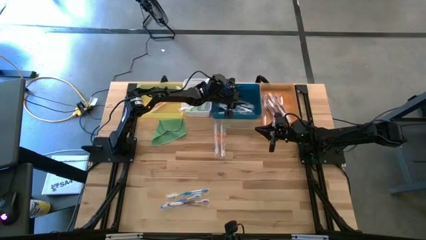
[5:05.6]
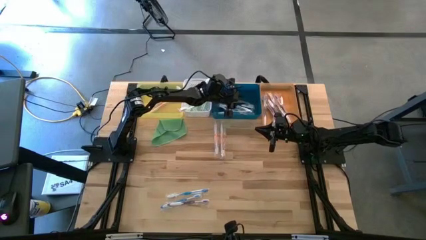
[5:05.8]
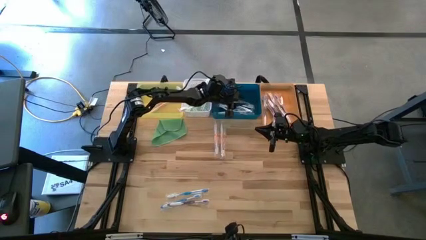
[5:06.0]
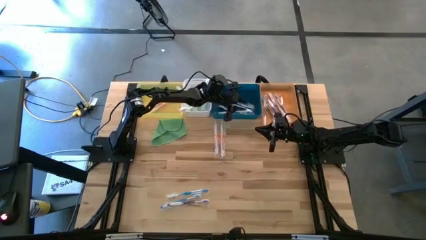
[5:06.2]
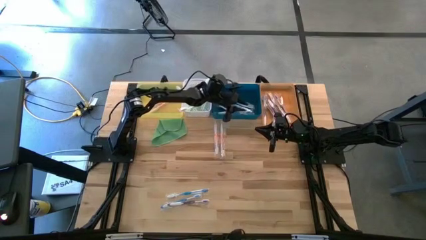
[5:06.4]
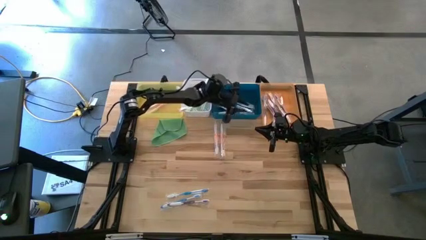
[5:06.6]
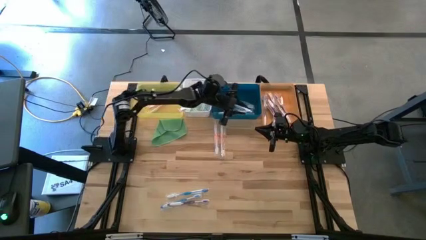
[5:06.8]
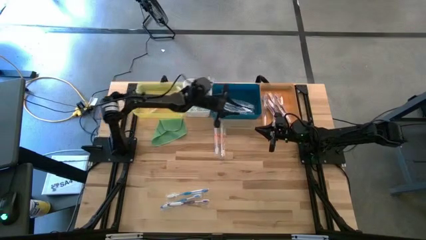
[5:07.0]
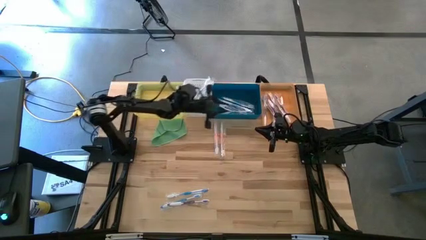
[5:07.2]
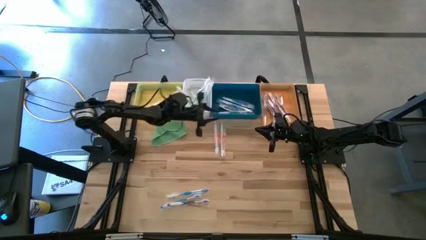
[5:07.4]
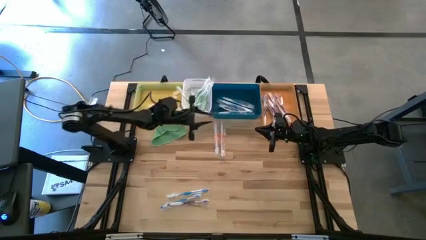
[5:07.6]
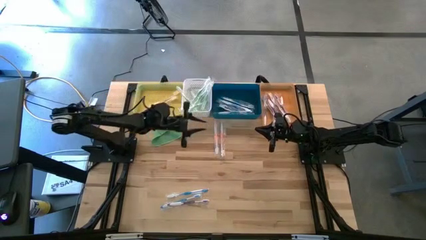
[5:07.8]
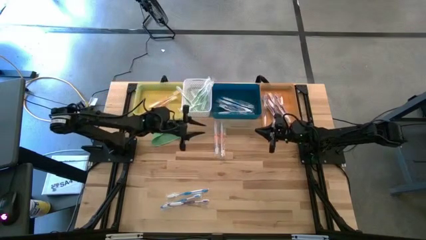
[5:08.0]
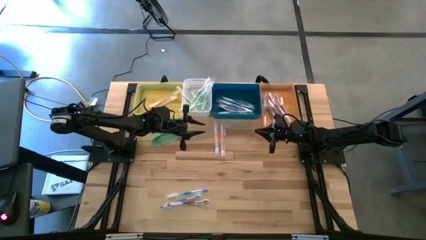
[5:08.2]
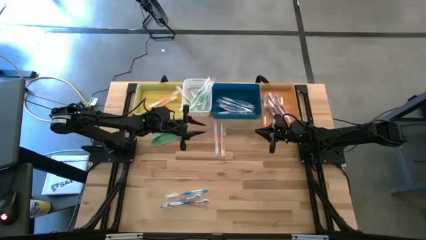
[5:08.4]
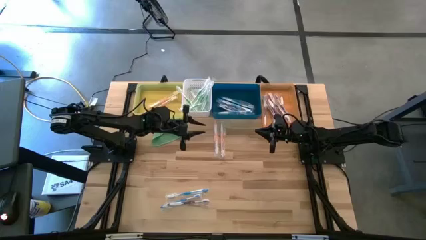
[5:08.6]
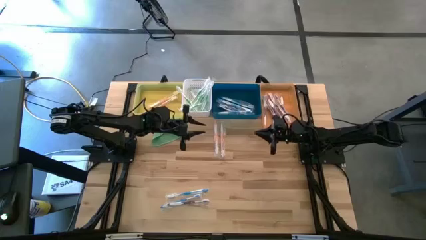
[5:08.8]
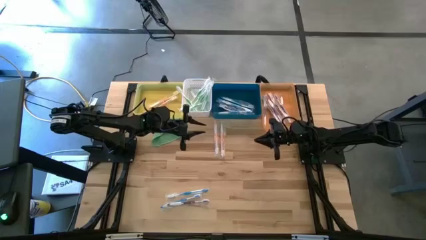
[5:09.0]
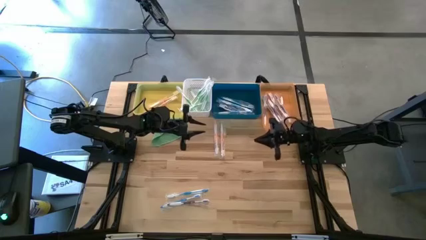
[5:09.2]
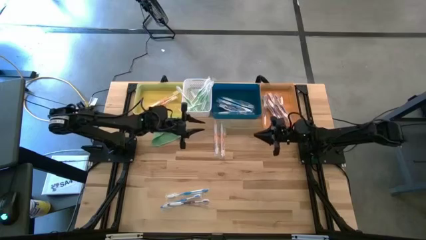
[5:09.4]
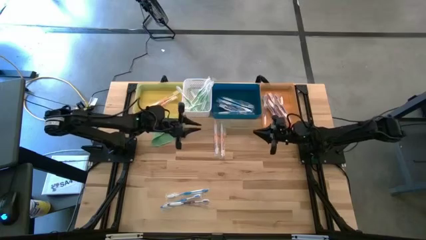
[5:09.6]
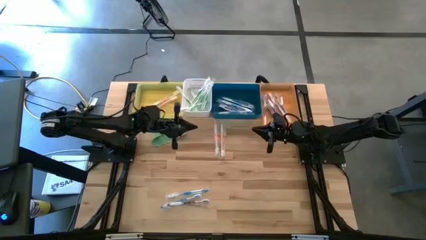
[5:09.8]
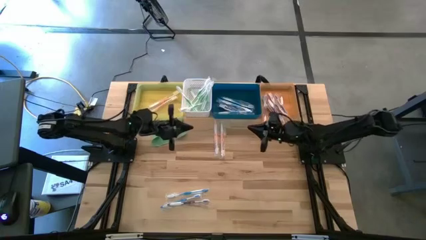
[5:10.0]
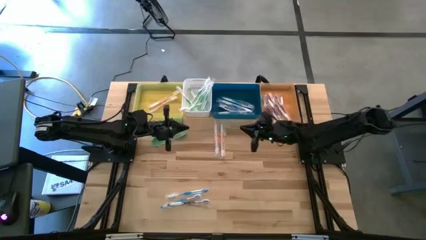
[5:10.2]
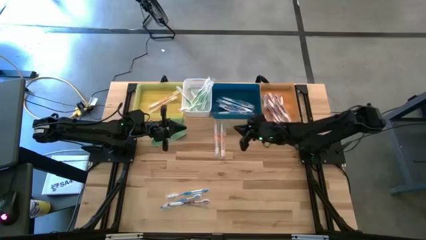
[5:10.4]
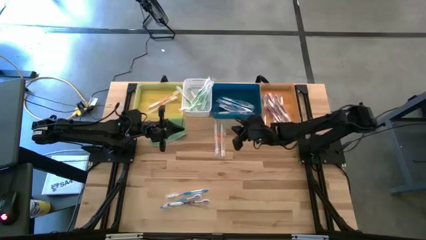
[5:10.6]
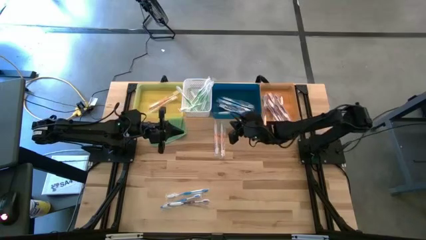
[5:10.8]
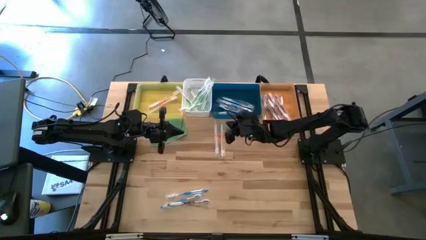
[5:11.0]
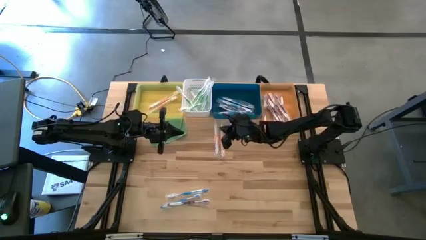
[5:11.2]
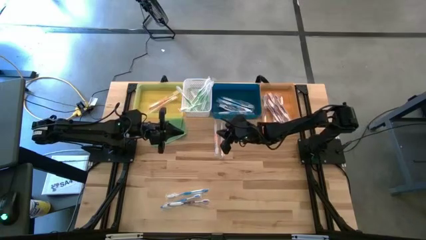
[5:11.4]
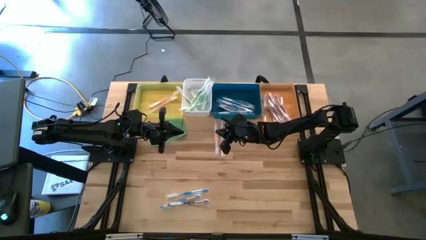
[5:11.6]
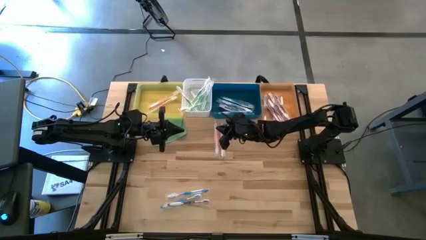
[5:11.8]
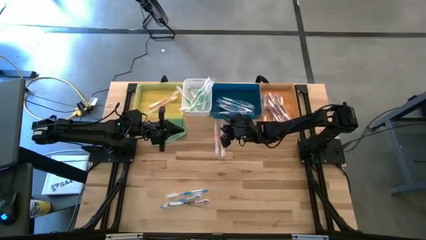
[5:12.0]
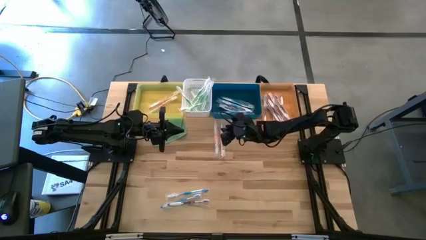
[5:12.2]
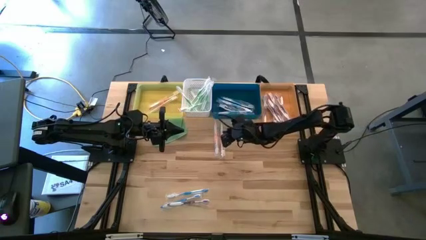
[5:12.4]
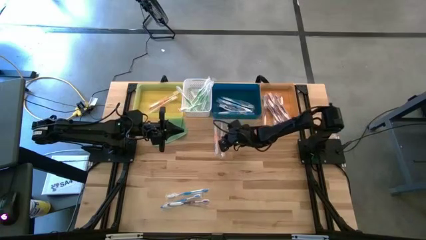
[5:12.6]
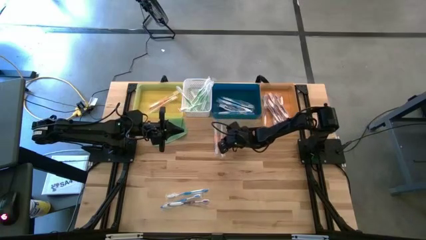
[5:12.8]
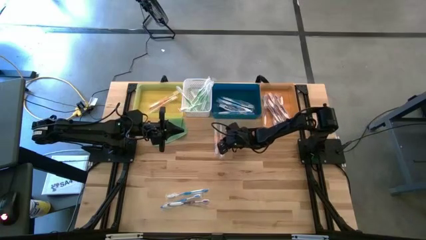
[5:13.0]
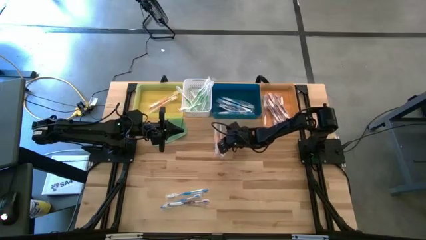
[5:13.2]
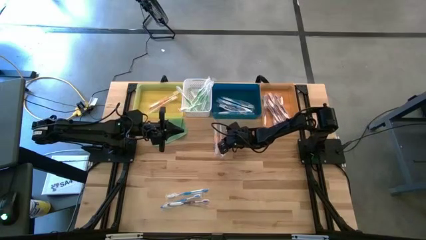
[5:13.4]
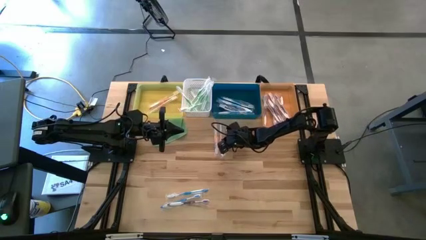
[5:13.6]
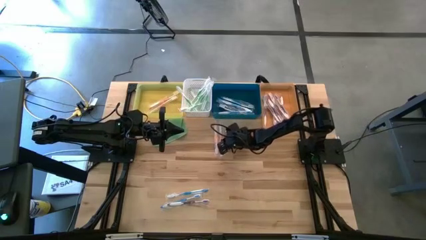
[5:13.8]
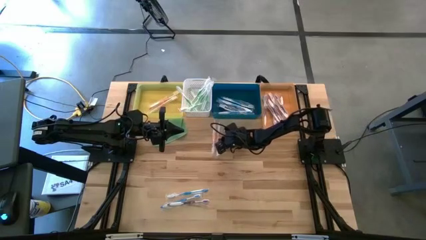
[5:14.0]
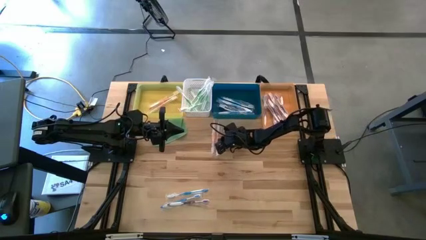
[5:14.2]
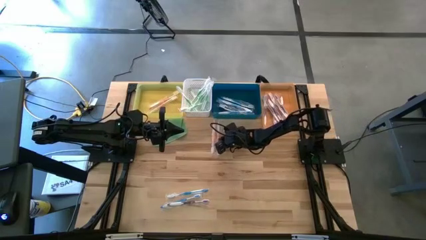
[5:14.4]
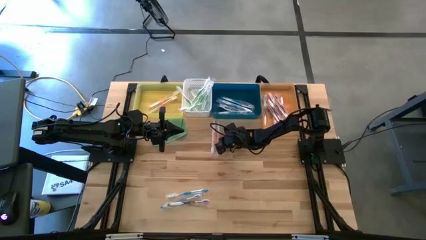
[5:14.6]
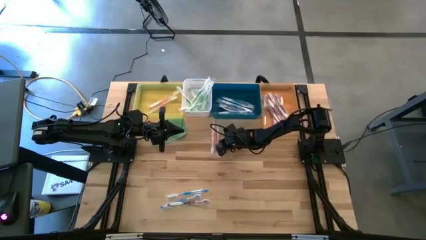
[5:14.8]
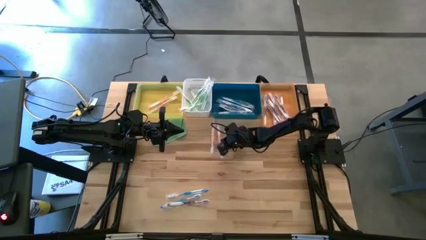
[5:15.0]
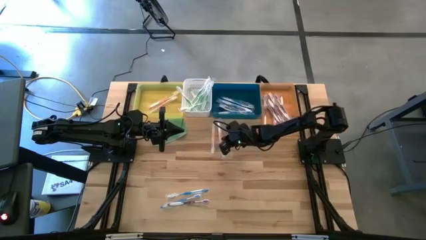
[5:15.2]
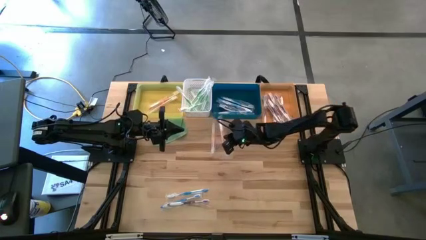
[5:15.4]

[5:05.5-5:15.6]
Task: Pick & Place Toothbrushes
Put the orange toothbrush into the yellow bin

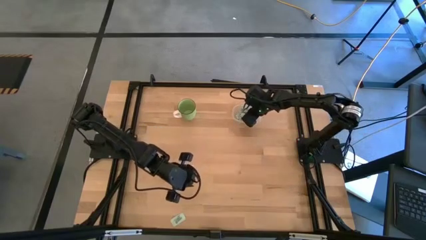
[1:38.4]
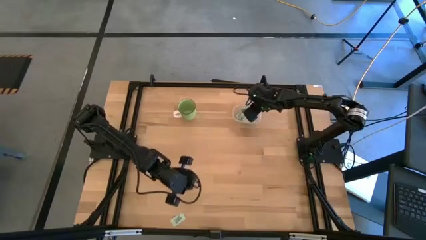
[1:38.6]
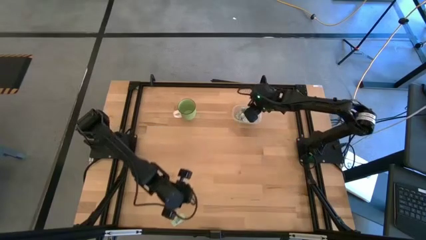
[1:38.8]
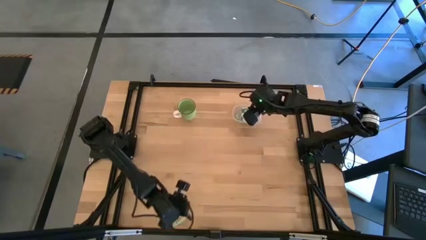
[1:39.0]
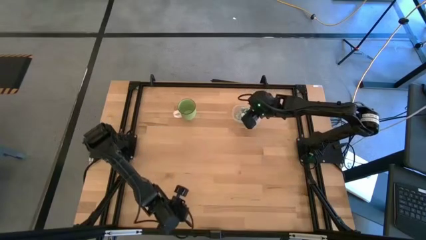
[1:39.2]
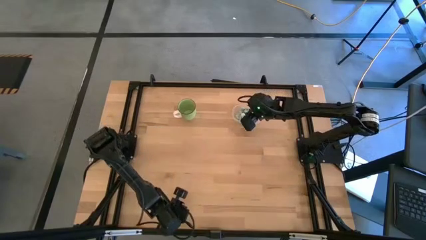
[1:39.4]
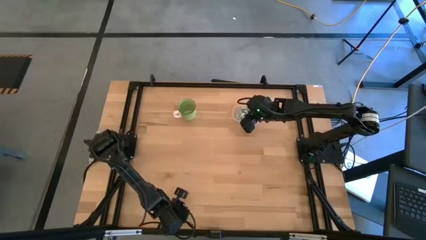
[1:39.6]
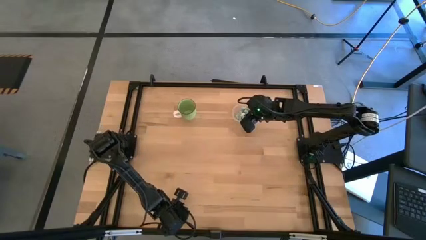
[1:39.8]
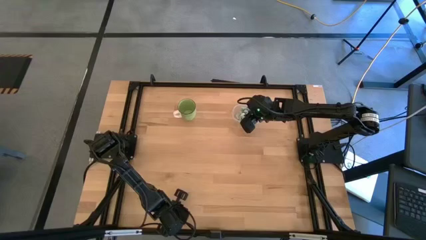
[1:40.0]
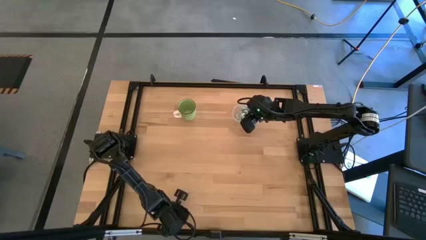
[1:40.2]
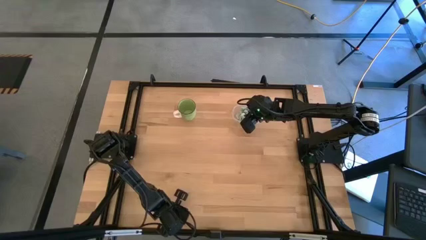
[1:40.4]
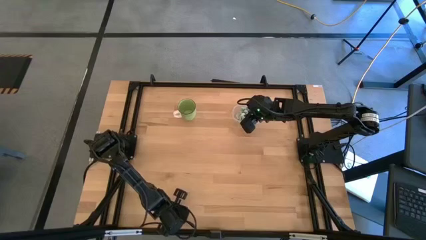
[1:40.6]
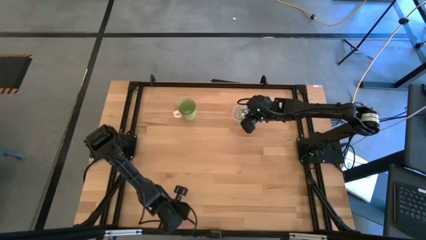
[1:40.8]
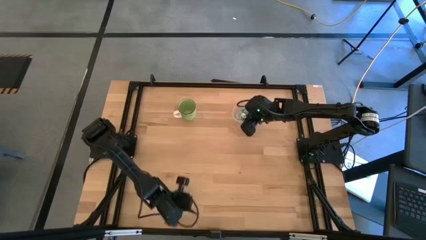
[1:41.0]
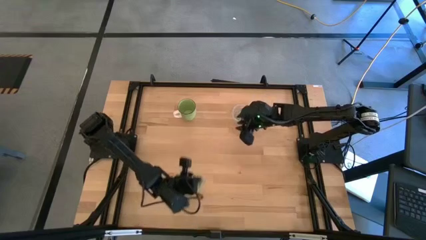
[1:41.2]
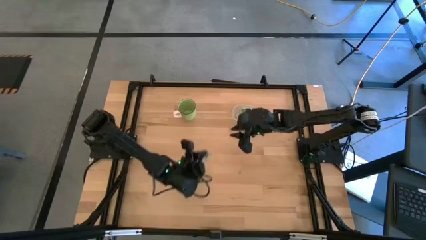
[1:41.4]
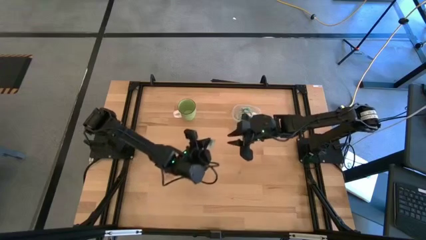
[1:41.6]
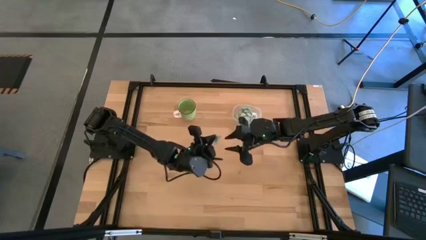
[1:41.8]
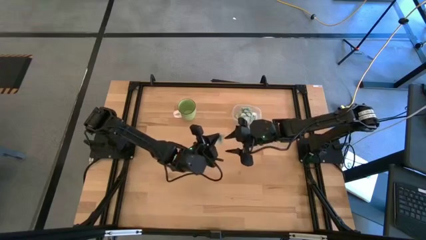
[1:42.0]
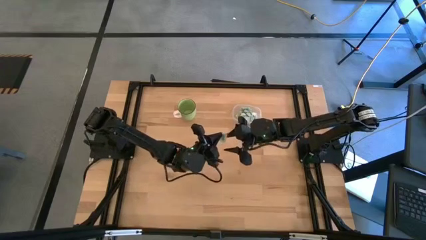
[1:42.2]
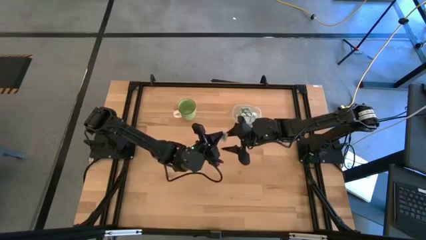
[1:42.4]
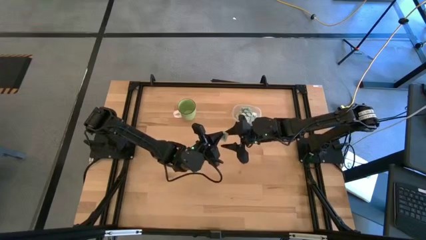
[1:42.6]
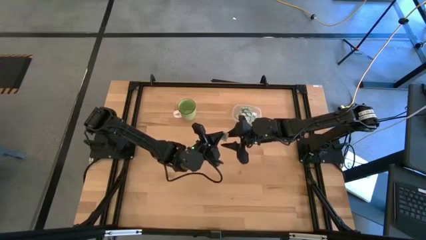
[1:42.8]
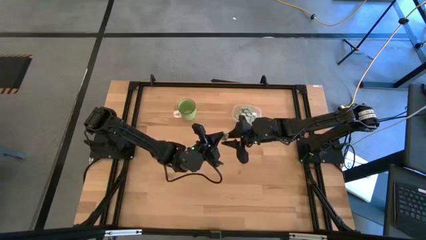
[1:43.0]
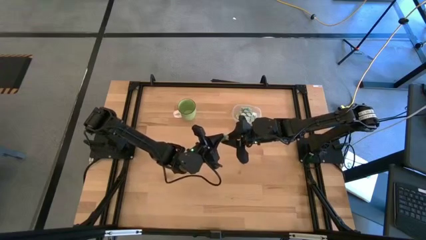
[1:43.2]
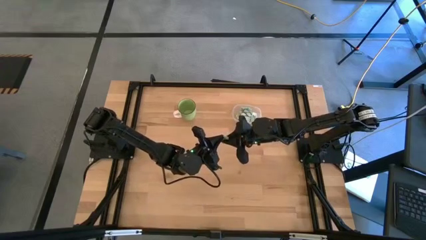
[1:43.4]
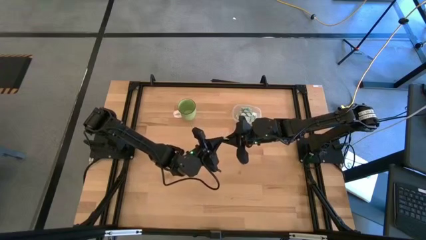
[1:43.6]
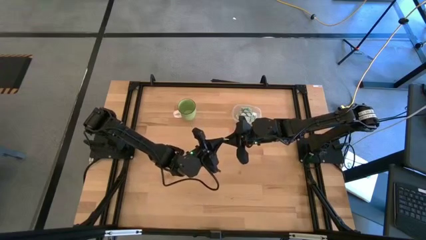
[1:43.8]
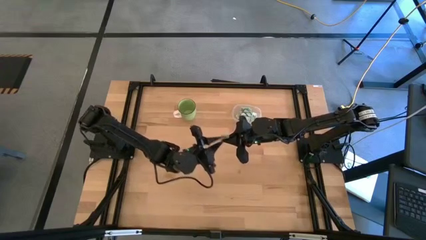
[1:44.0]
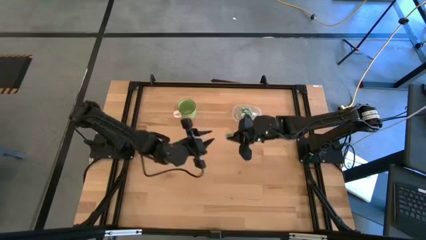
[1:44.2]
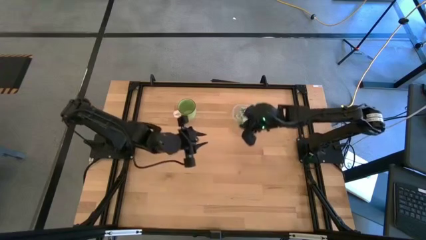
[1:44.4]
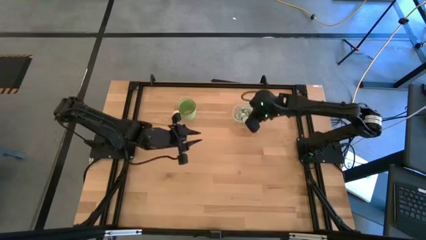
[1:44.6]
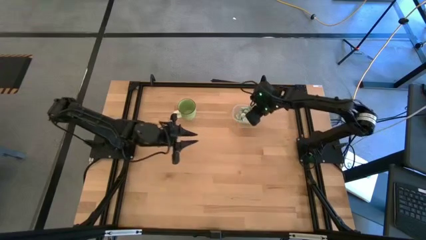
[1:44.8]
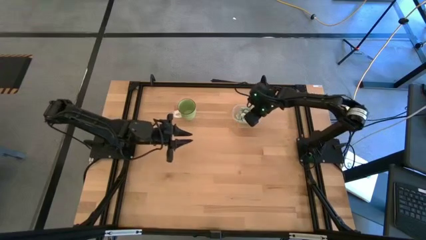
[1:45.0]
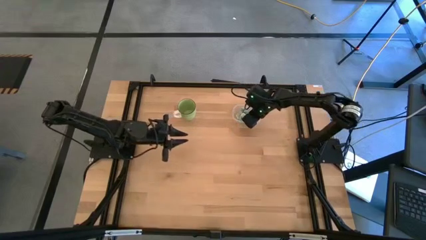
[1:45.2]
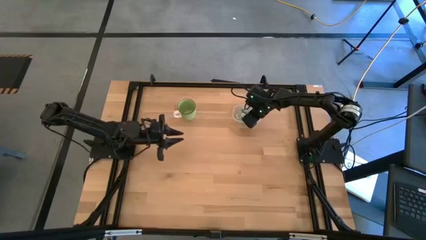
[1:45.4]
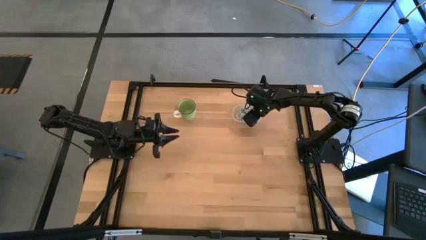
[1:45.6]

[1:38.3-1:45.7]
Task: Pick and place items into bin
Put the white stevia packet into the transparent bin
